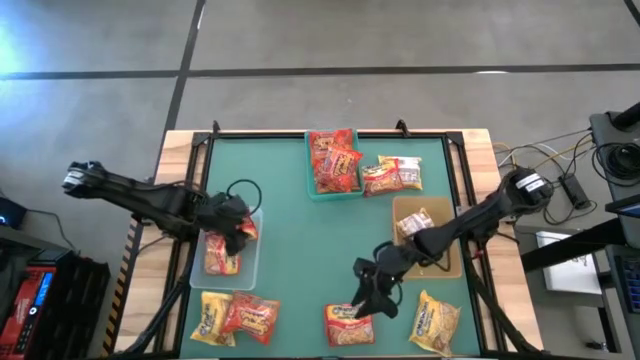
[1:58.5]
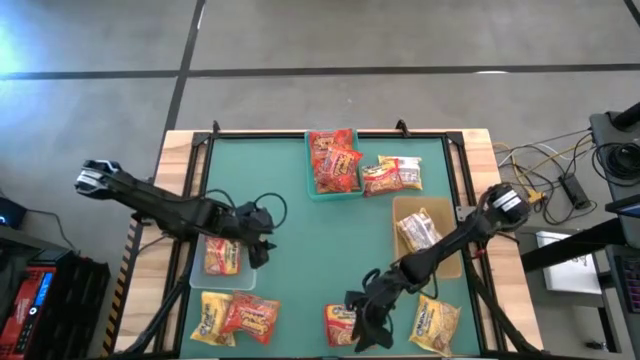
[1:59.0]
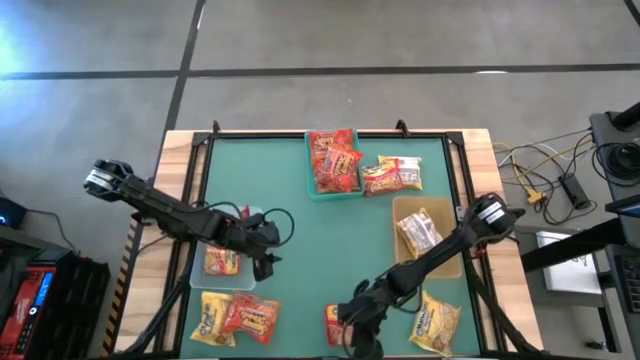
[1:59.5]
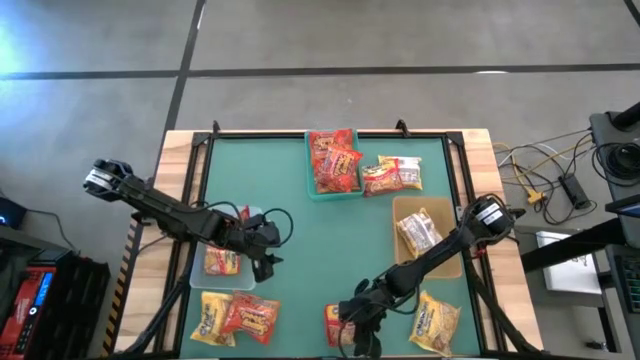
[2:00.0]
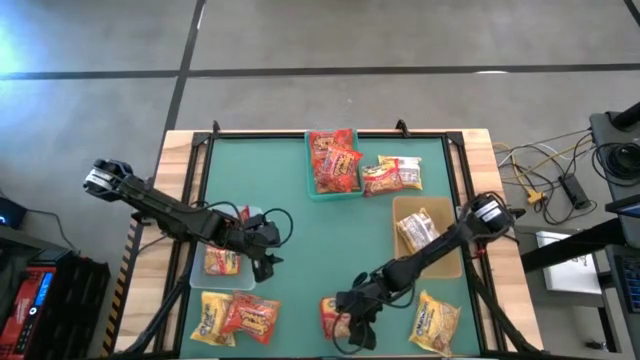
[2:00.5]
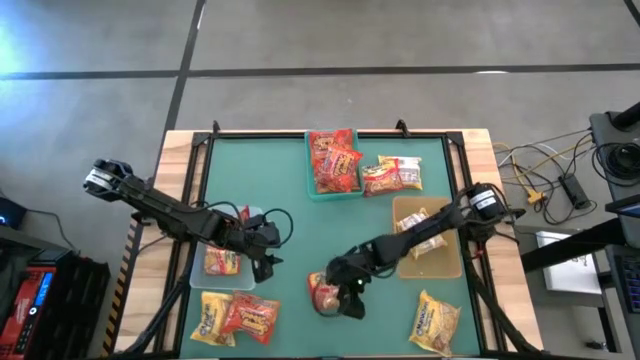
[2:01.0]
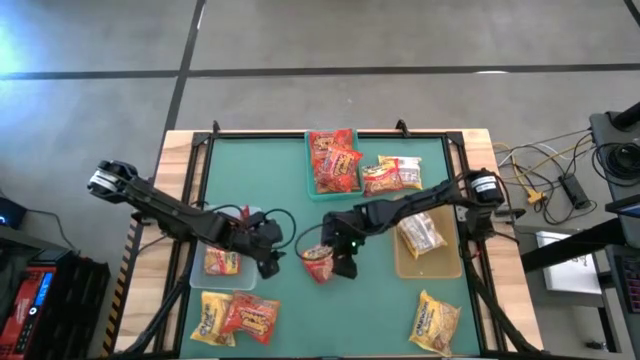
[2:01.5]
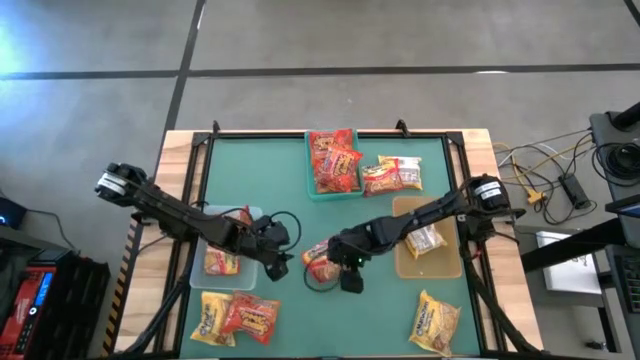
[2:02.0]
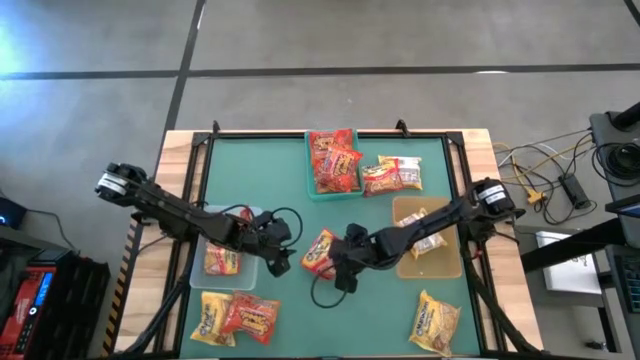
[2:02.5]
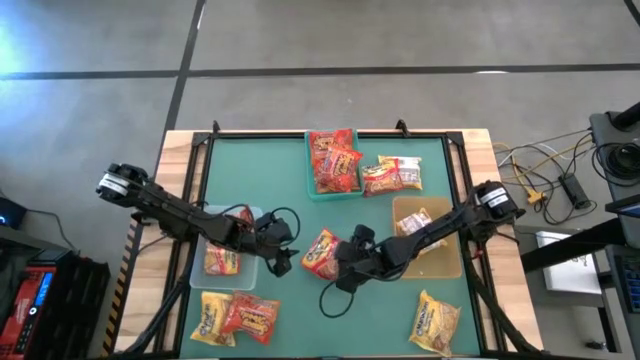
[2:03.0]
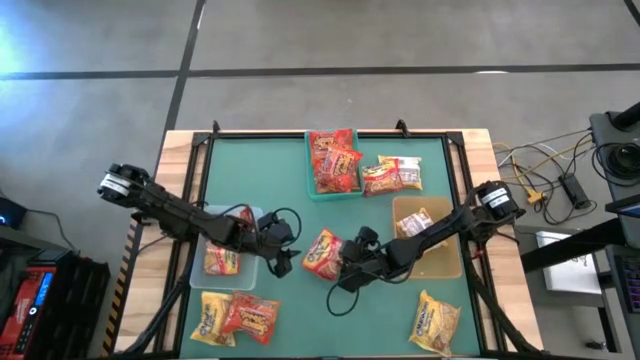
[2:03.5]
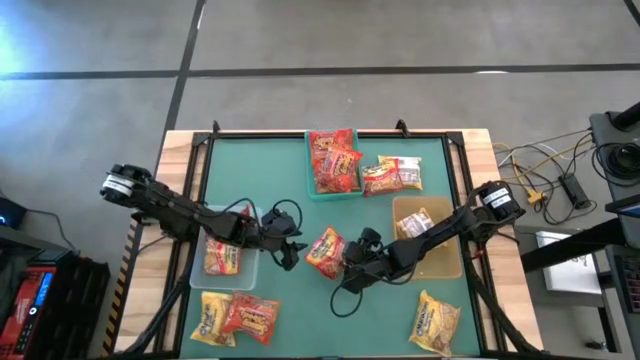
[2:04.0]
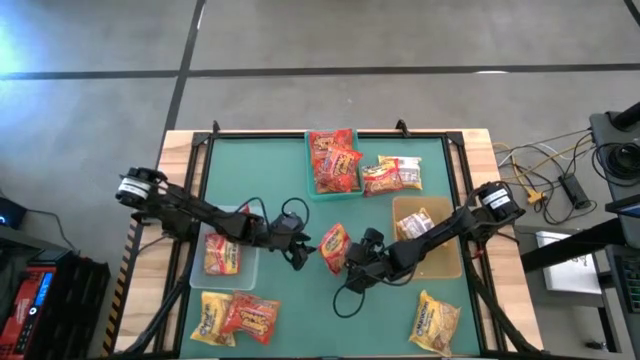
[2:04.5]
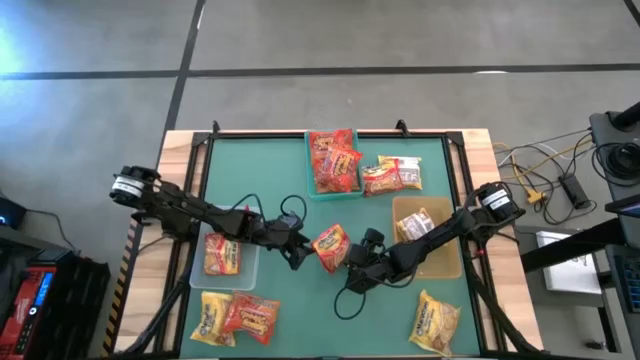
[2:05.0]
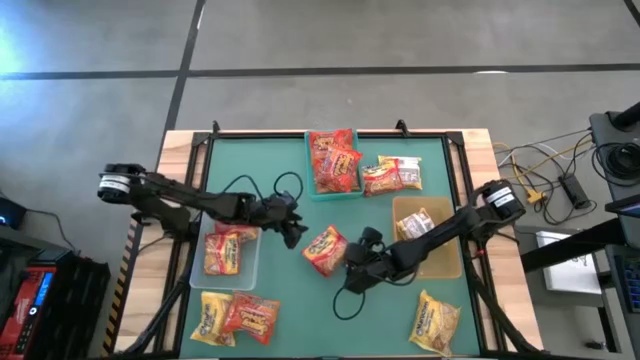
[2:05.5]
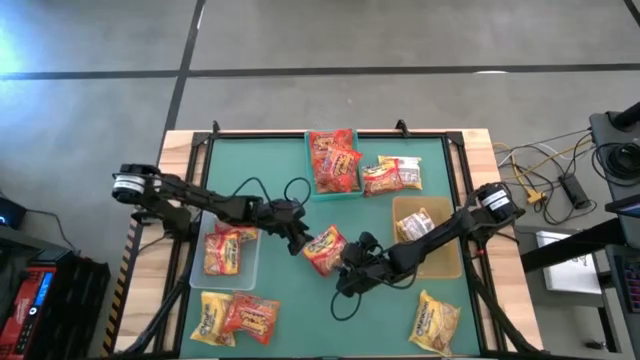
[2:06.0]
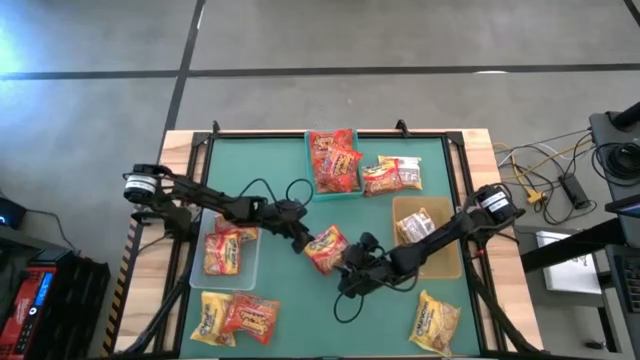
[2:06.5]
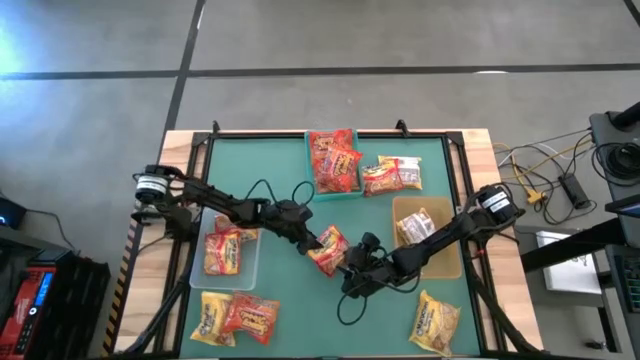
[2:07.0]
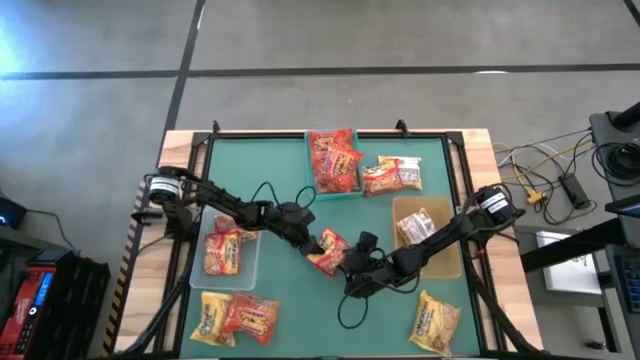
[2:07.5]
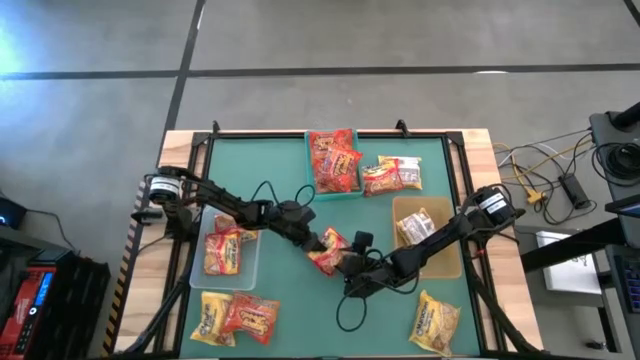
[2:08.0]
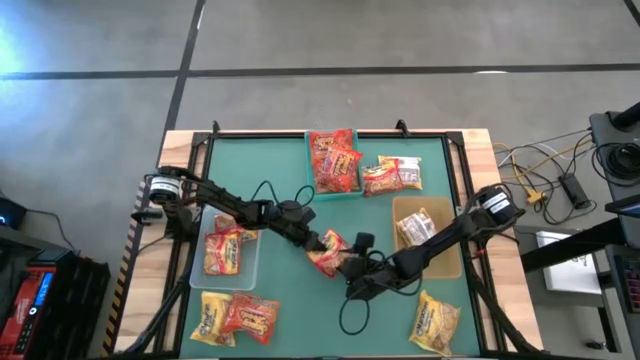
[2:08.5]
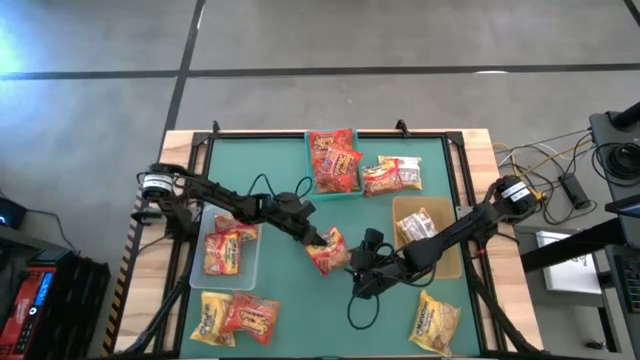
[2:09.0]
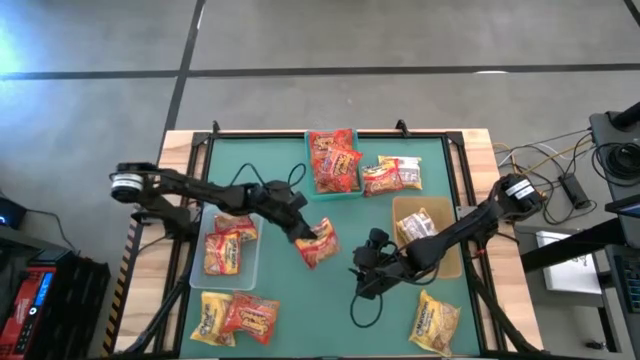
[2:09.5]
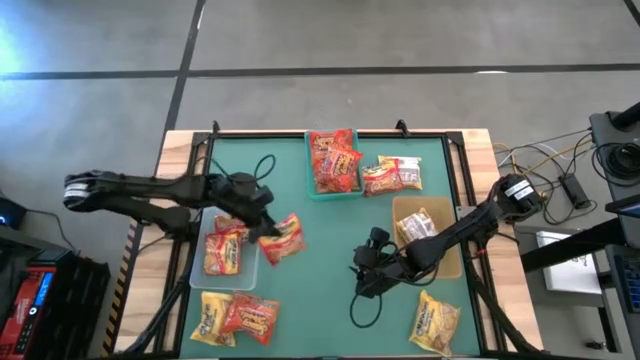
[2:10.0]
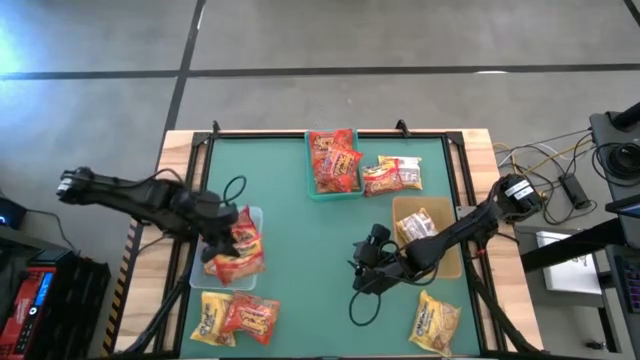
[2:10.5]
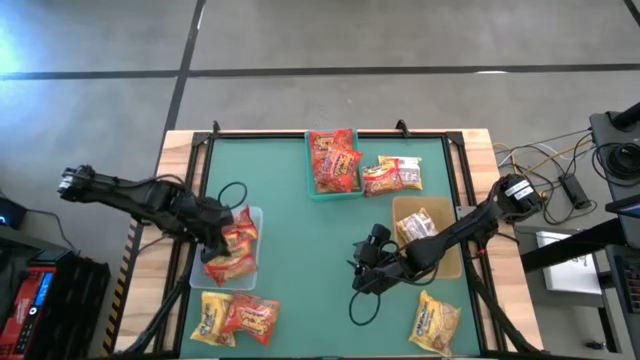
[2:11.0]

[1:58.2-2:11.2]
Task: Sort Maruchan noodles
Put the red noodle pack into the white transparent bin

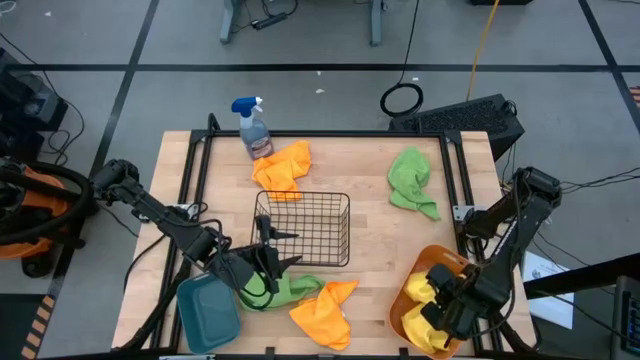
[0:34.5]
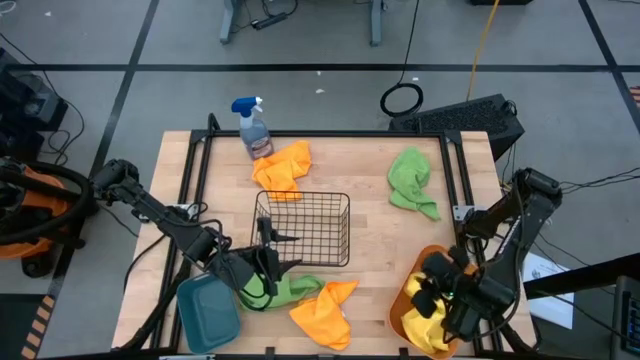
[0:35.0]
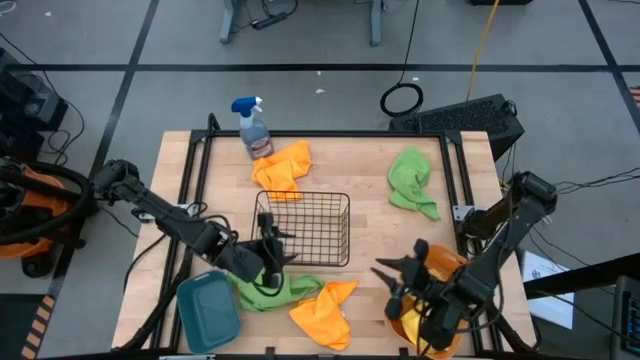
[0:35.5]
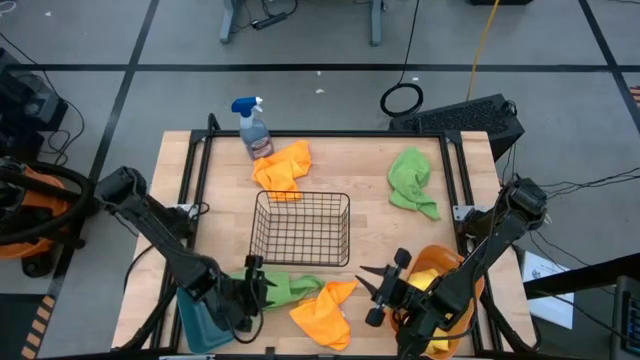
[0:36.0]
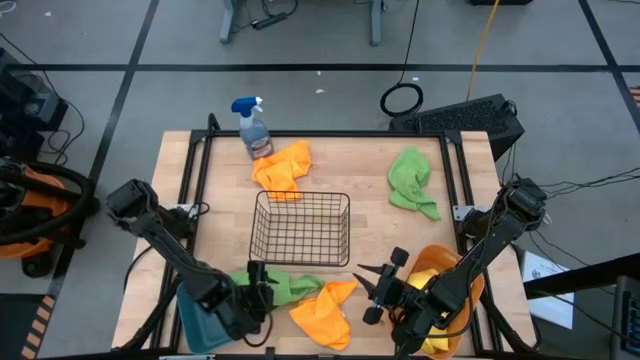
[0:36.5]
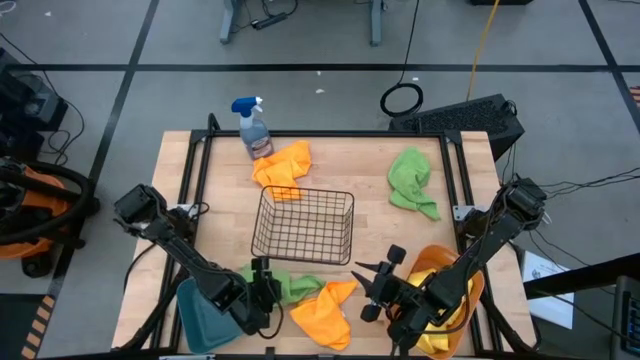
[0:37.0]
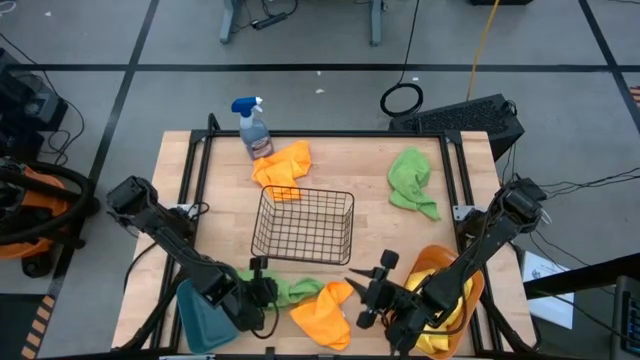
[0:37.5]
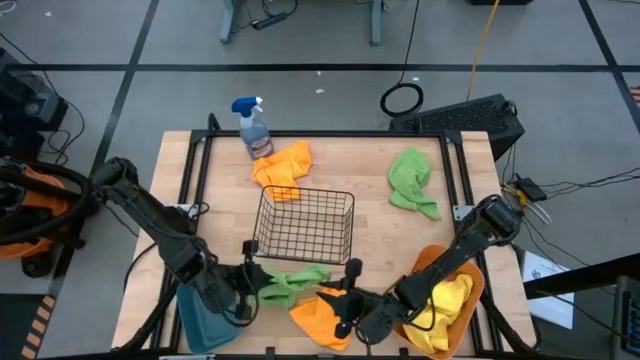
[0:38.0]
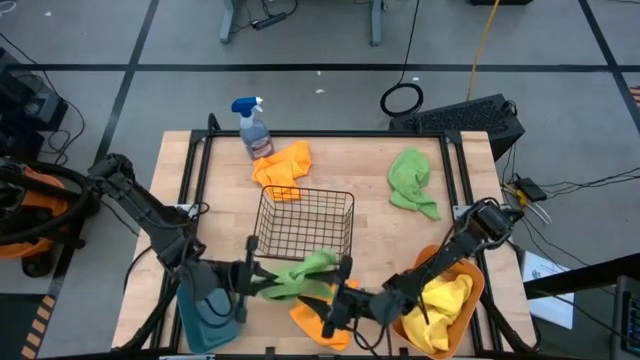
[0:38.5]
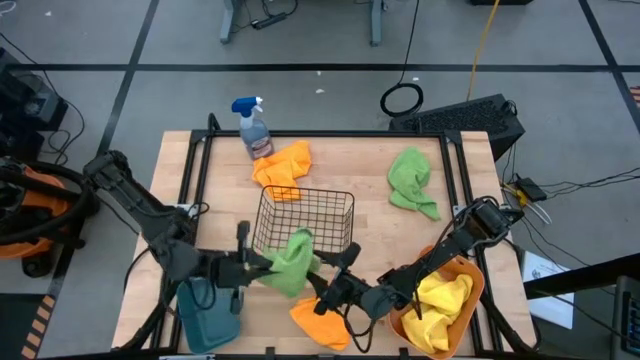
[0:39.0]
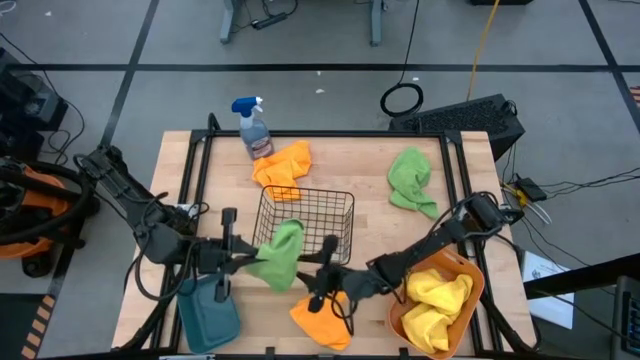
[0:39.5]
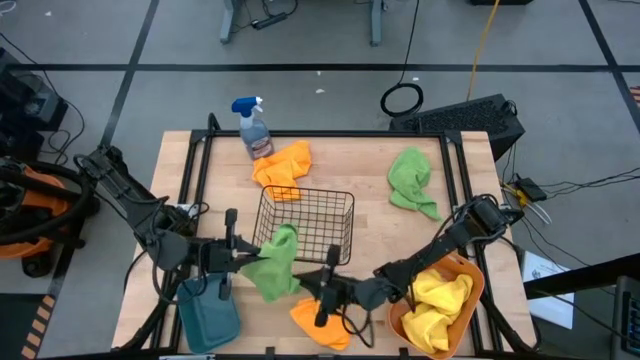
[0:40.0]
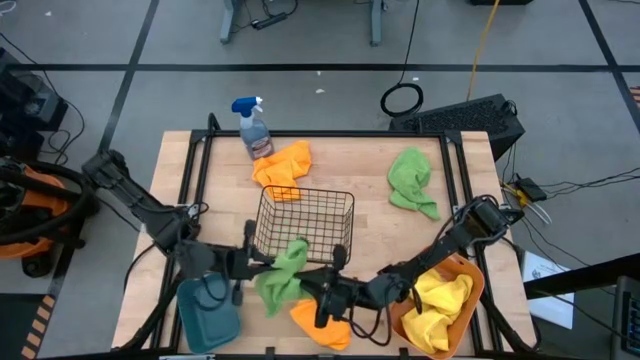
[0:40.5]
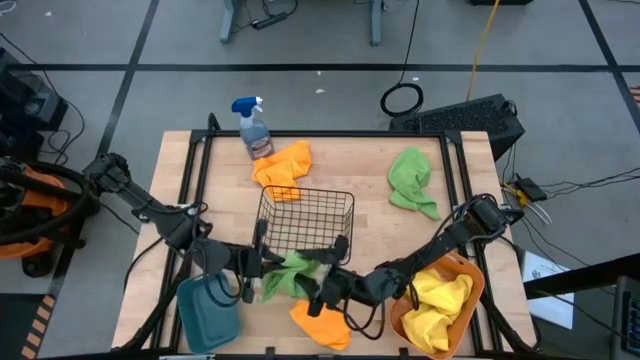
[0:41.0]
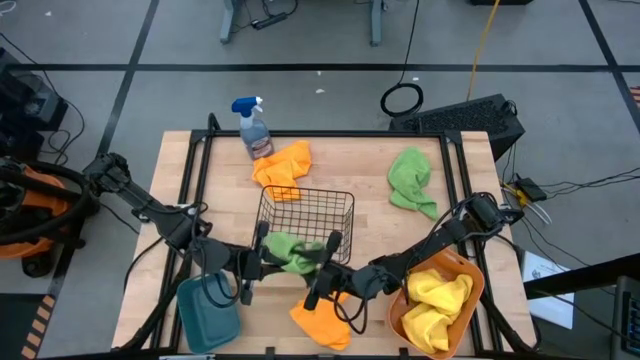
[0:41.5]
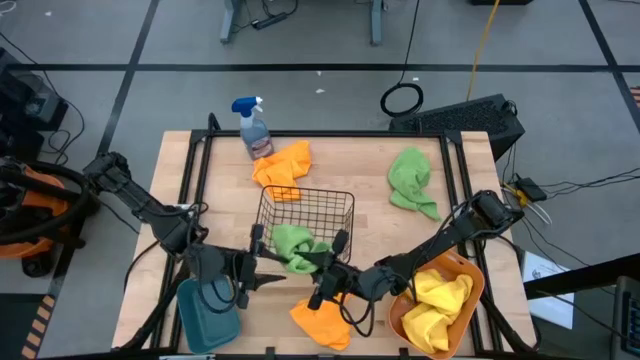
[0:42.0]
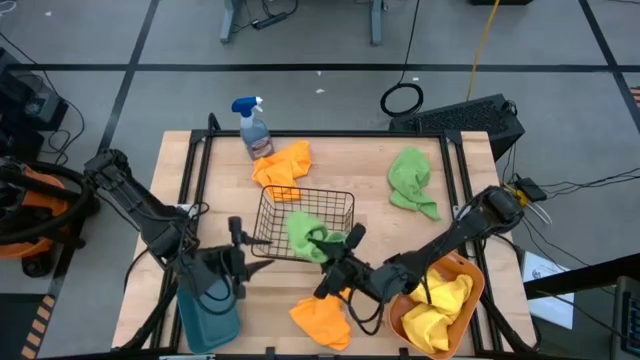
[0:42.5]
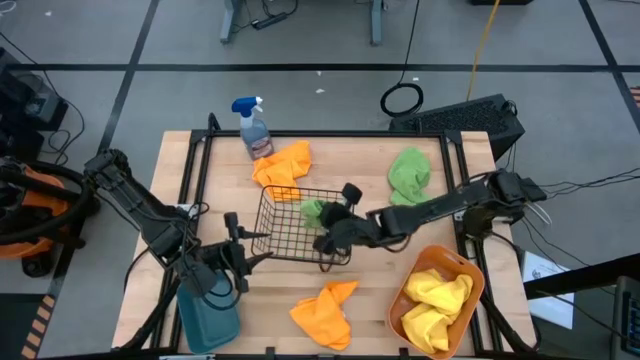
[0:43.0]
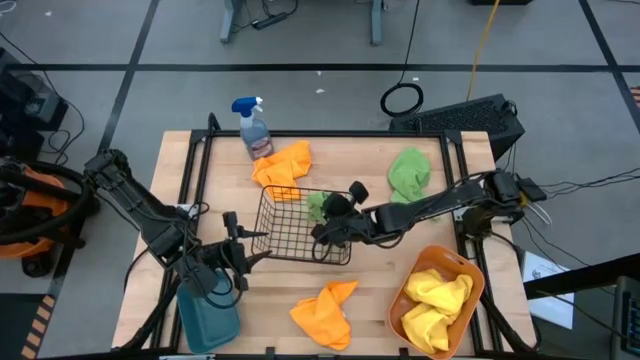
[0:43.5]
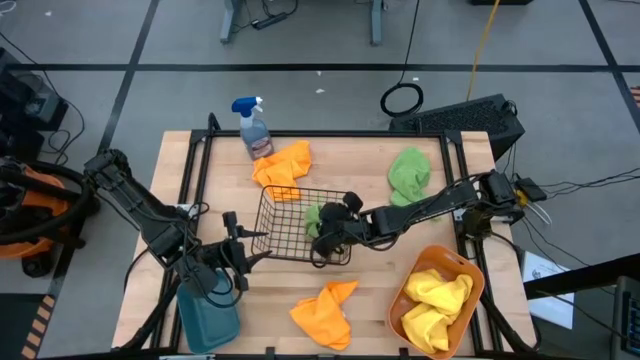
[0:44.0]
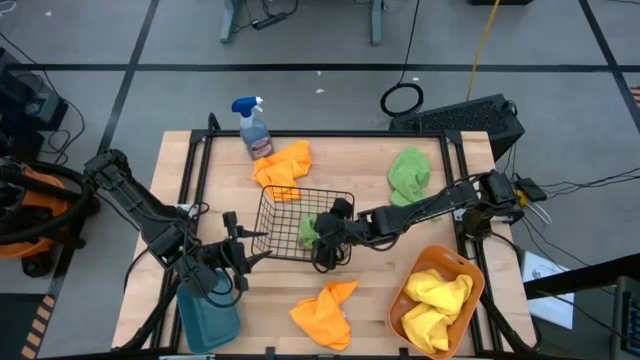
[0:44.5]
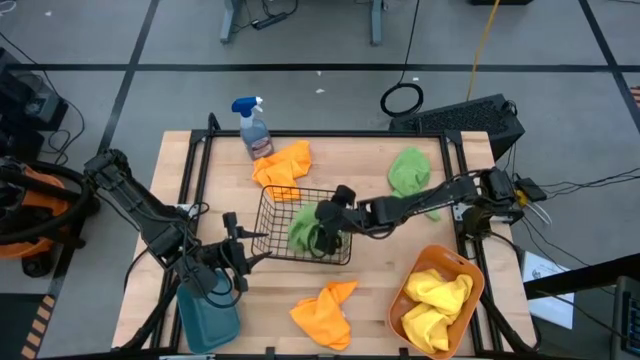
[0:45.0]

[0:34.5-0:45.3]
Task: Sort microfiber towel by color & place in baskets
Put the bottom green microfiber cloth into the black wire basket
